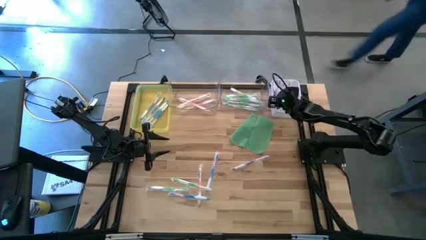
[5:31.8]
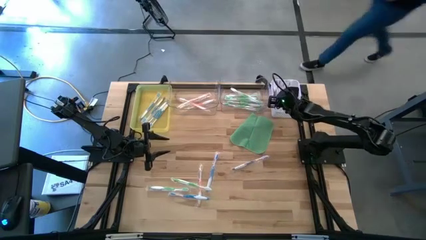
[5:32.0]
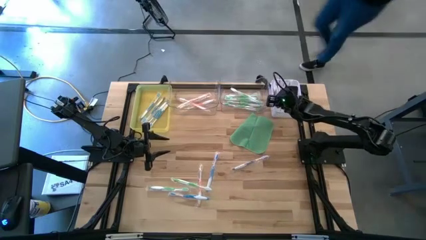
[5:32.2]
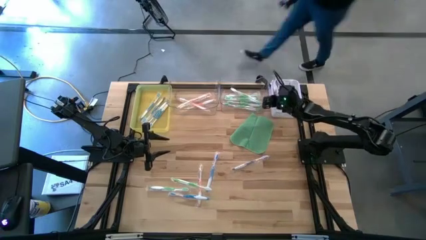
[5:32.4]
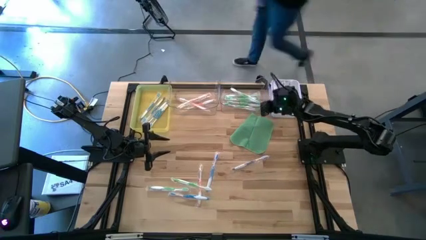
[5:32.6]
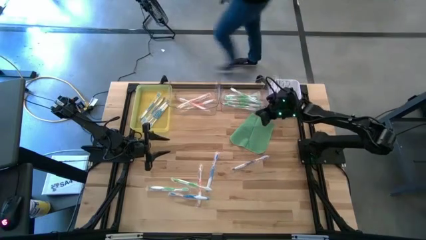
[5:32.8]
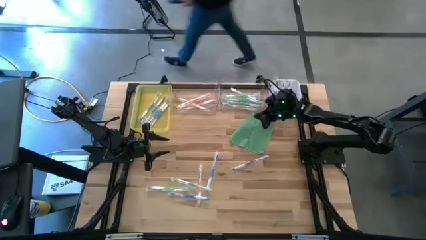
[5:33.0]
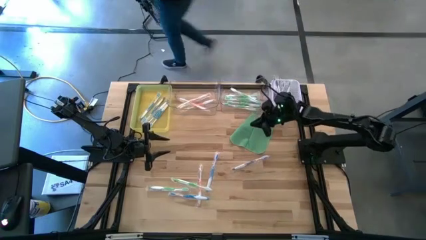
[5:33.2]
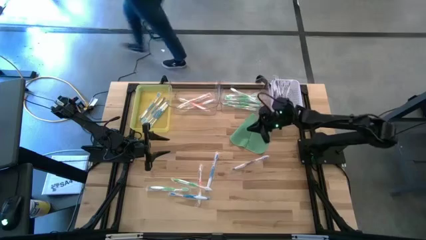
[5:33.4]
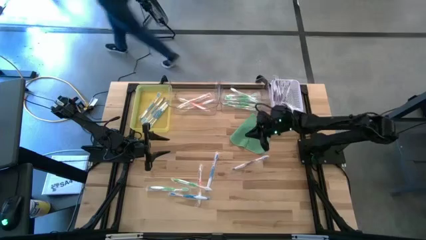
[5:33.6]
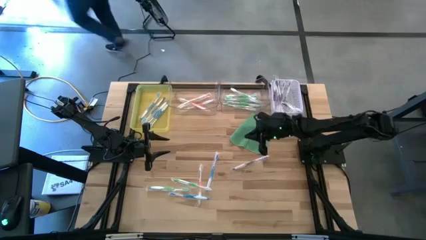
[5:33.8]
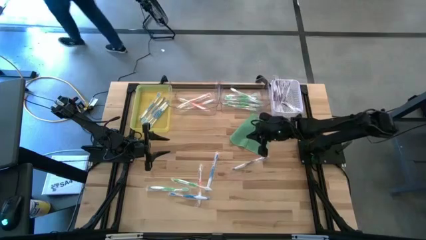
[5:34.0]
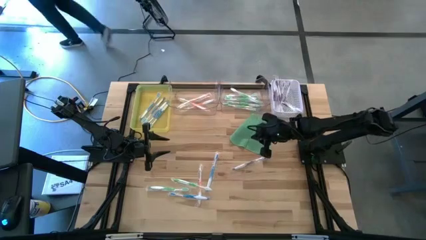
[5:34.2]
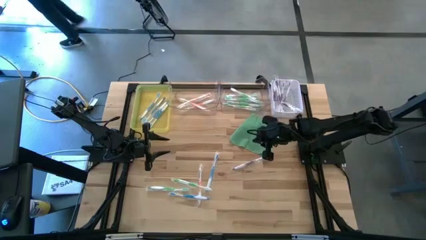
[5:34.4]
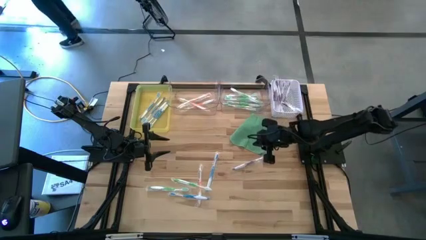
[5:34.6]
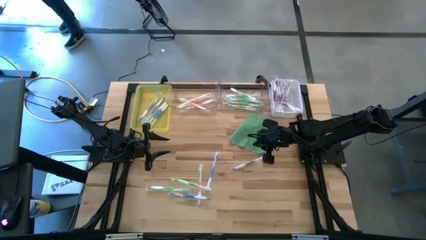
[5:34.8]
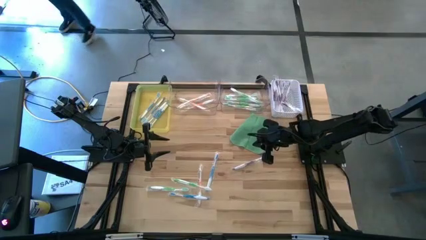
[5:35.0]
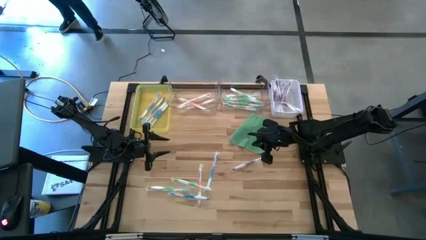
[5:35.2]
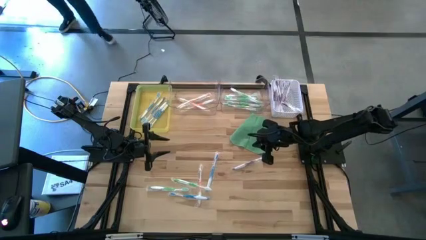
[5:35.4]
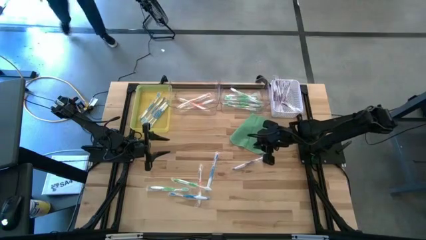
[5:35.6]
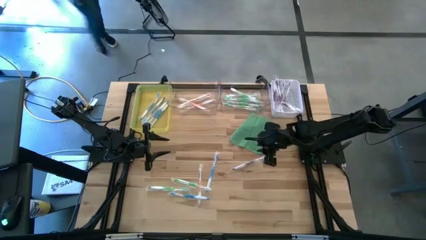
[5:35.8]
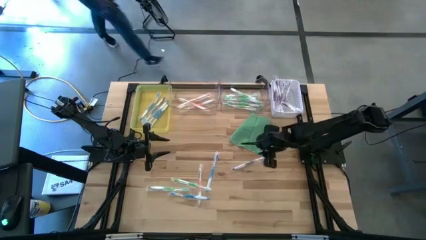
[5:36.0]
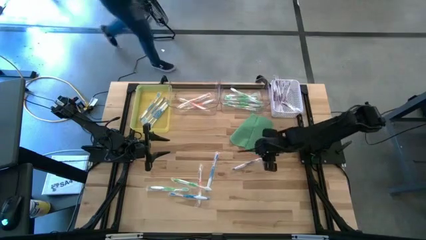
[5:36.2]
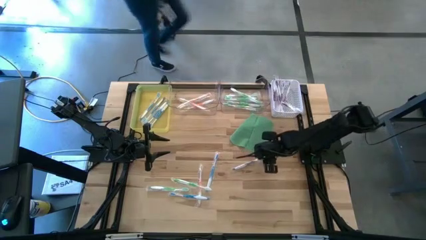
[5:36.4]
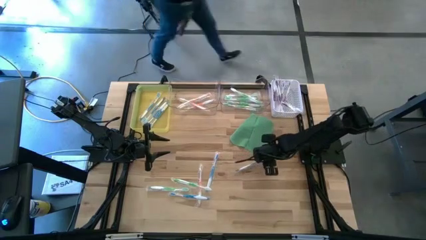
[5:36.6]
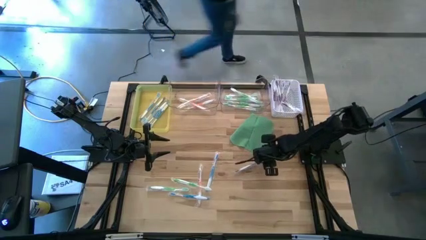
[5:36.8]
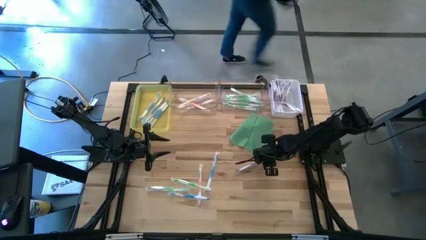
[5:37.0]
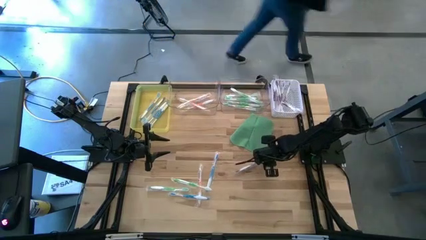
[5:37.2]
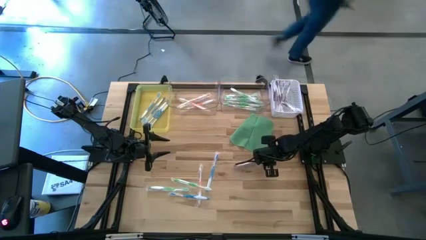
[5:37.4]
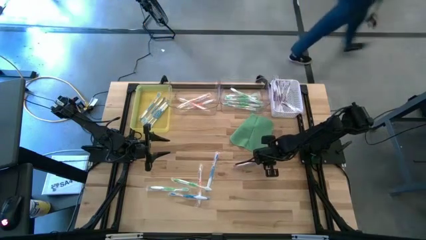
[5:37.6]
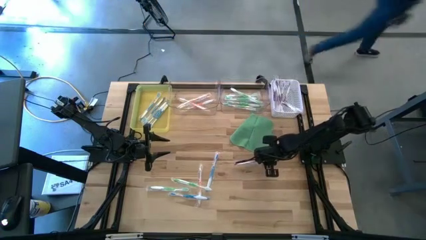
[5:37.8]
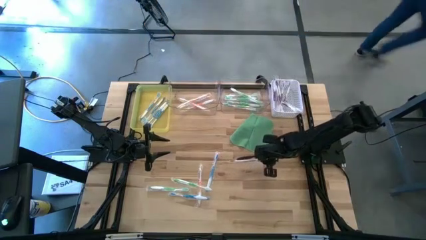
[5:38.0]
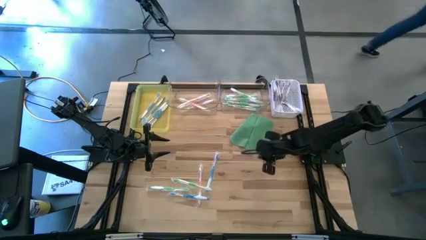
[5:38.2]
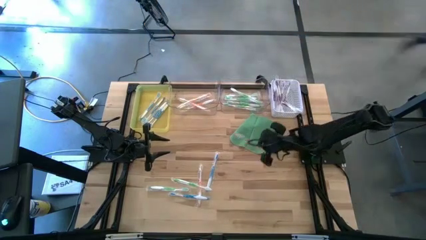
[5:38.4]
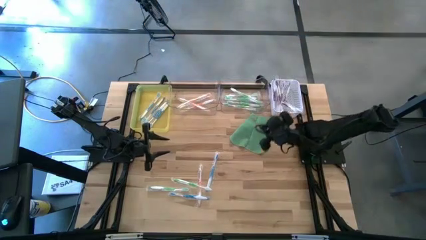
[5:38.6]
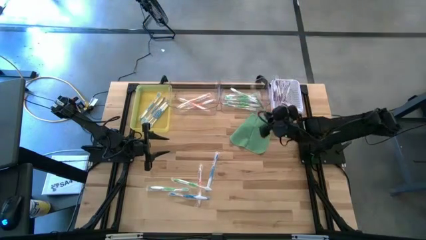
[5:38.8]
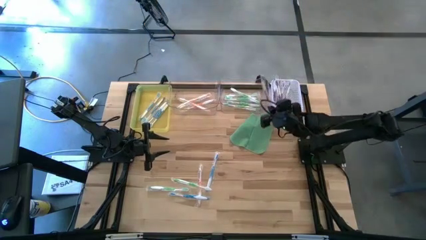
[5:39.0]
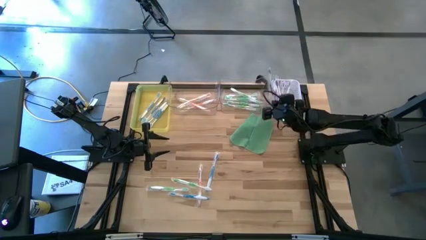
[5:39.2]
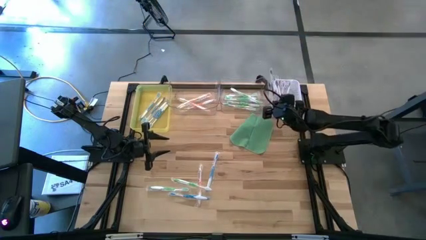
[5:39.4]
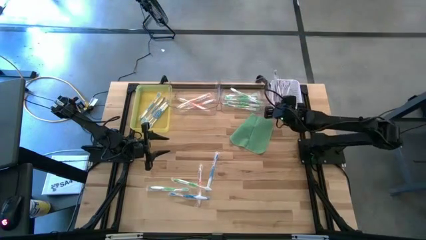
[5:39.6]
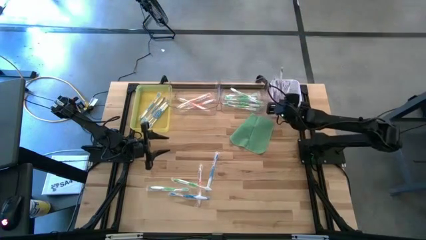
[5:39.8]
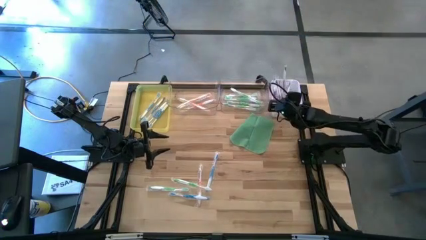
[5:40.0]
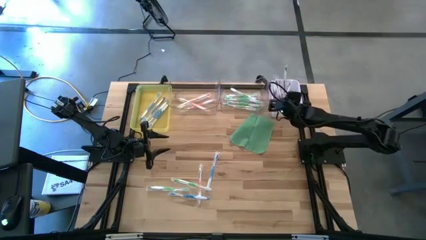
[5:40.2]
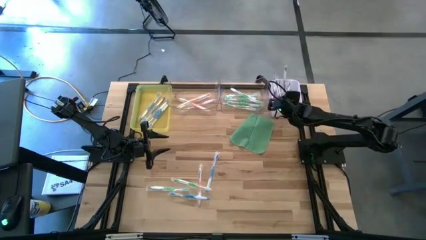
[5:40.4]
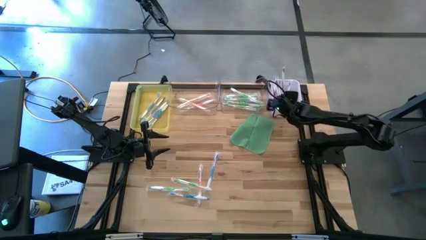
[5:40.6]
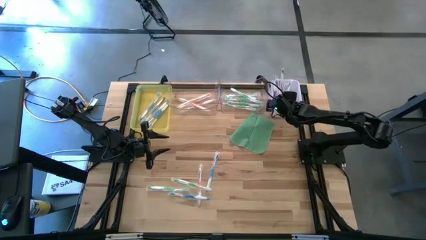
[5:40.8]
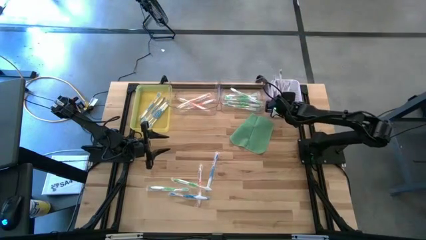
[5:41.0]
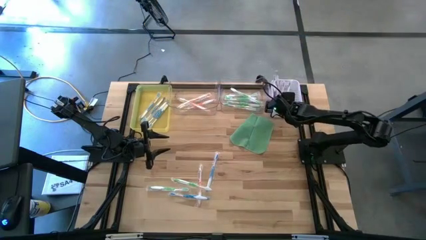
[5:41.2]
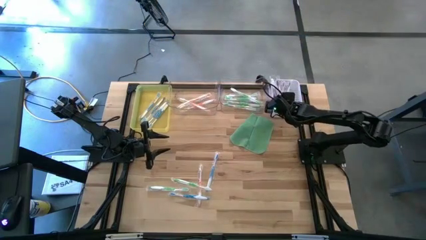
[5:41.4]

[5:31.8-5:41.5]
Task: Pick & Place Toothbrushes
Put the purple toothbrush into the white bin

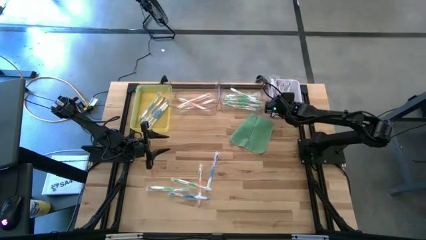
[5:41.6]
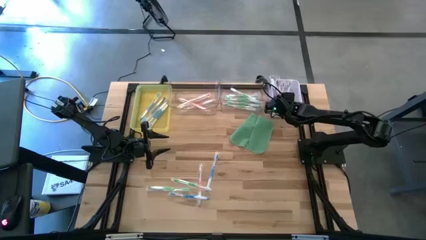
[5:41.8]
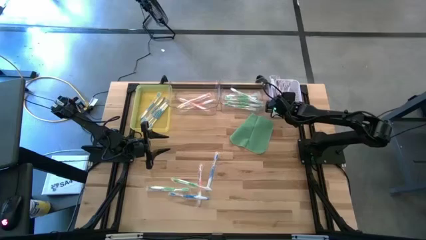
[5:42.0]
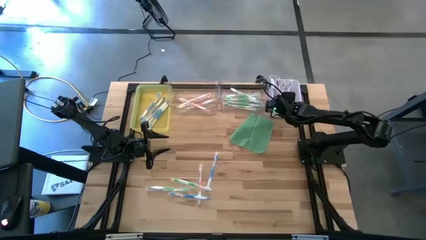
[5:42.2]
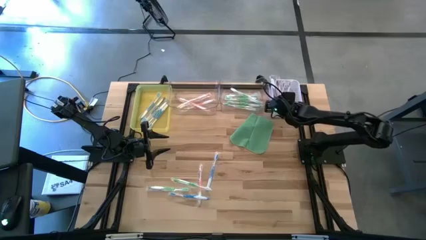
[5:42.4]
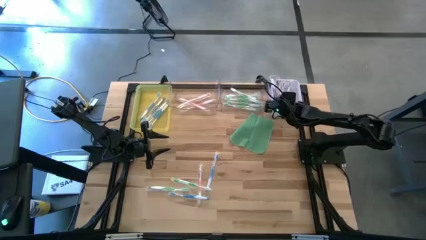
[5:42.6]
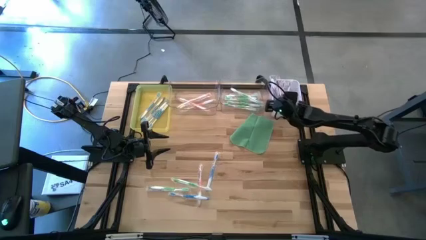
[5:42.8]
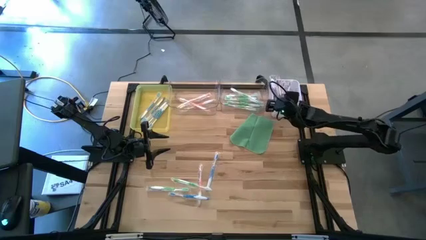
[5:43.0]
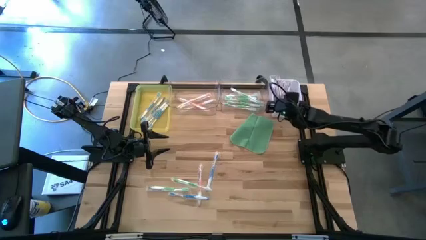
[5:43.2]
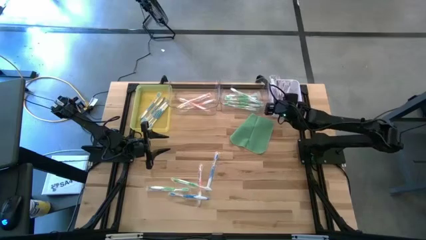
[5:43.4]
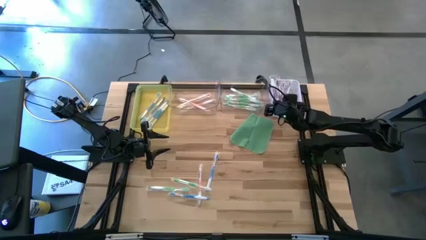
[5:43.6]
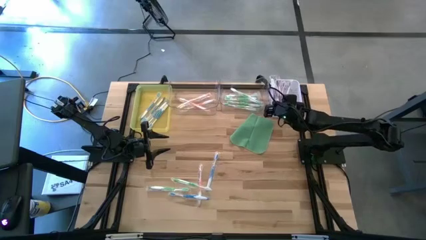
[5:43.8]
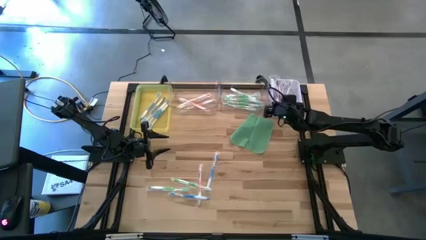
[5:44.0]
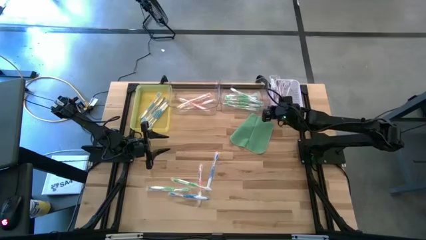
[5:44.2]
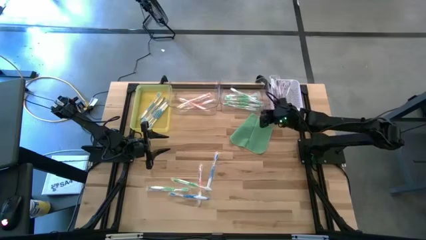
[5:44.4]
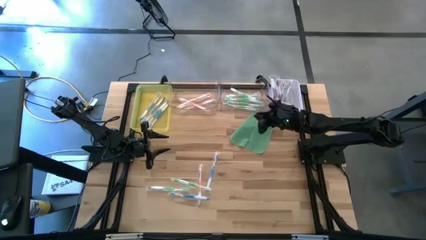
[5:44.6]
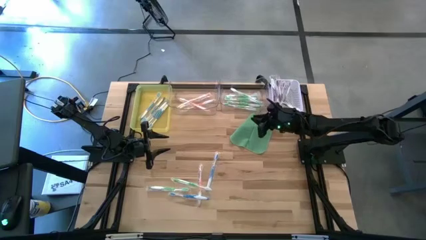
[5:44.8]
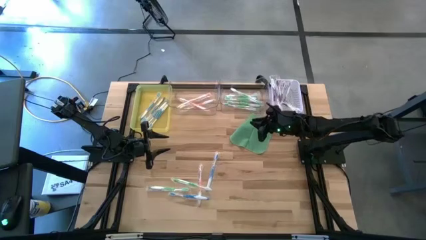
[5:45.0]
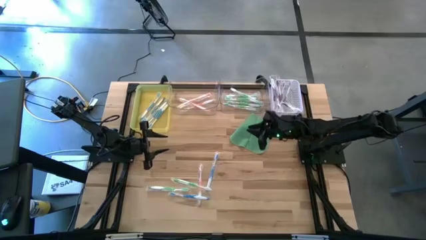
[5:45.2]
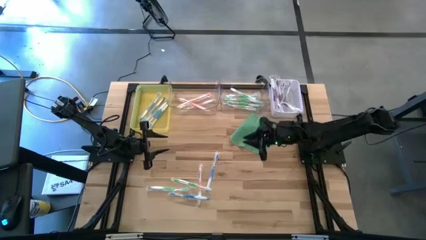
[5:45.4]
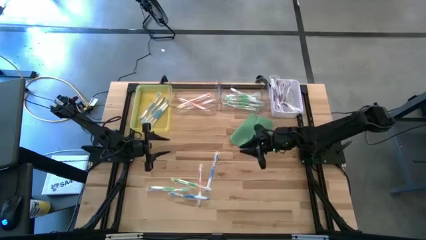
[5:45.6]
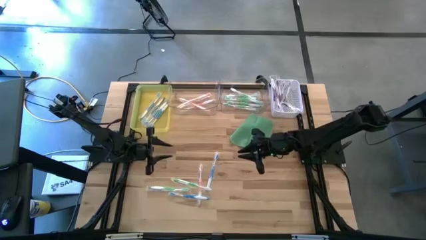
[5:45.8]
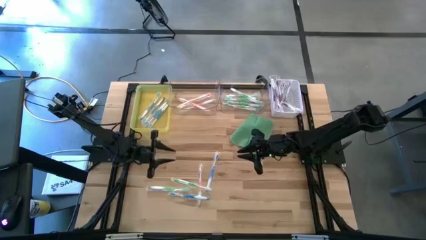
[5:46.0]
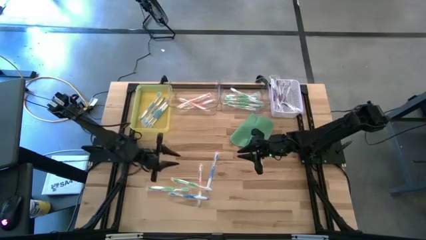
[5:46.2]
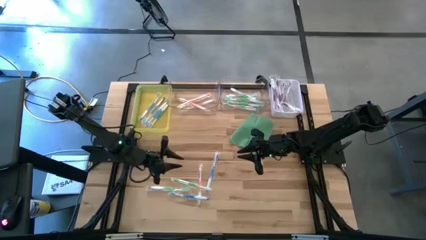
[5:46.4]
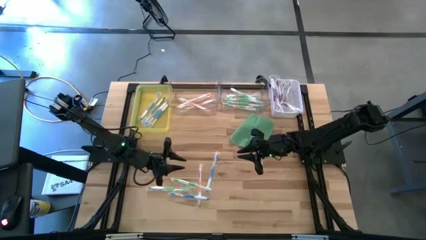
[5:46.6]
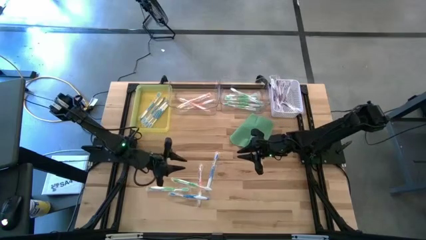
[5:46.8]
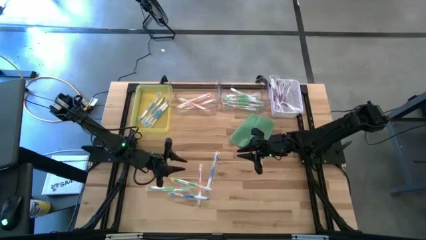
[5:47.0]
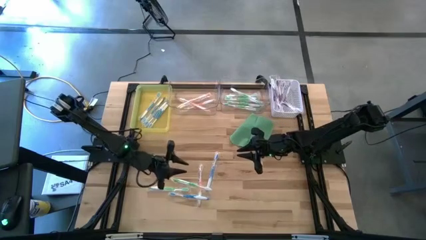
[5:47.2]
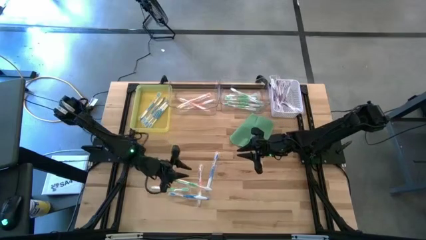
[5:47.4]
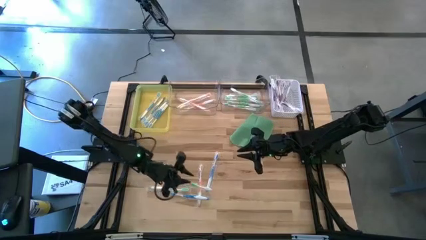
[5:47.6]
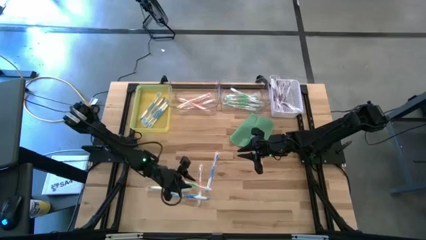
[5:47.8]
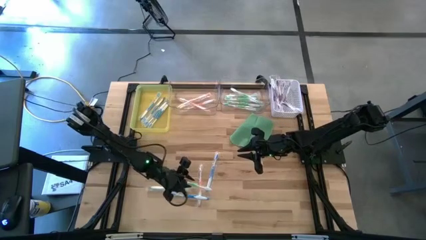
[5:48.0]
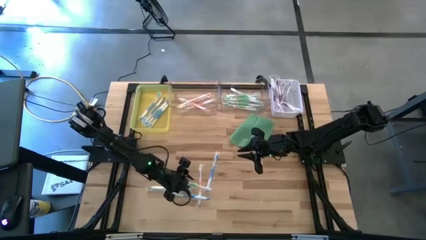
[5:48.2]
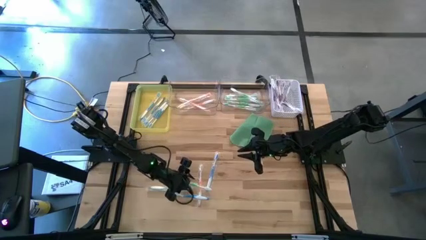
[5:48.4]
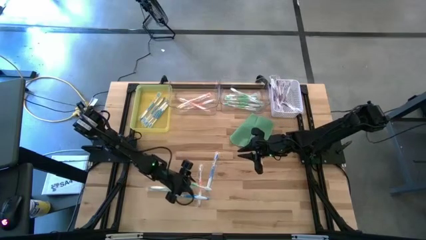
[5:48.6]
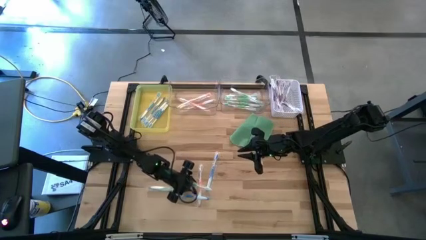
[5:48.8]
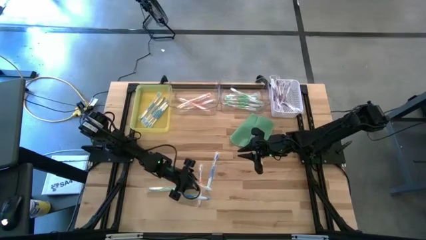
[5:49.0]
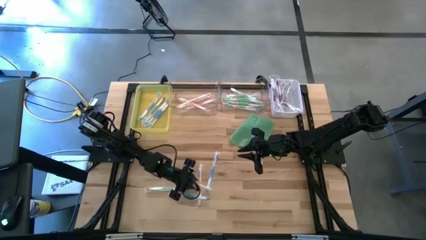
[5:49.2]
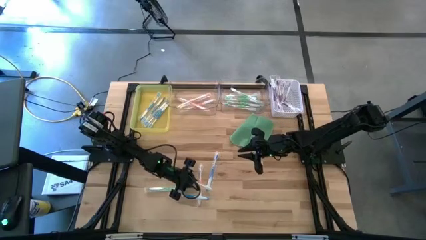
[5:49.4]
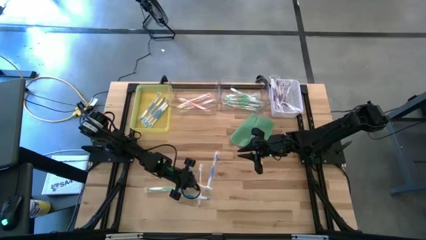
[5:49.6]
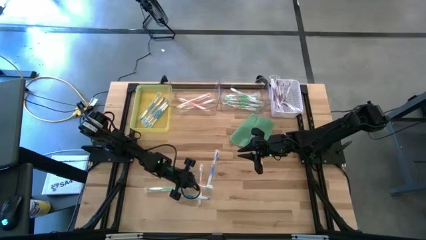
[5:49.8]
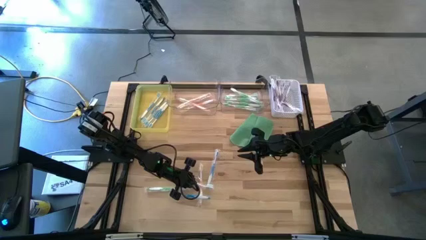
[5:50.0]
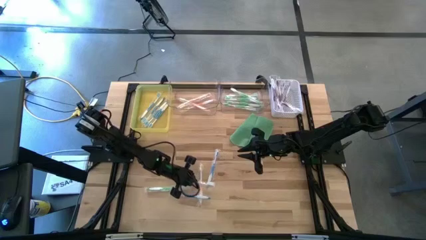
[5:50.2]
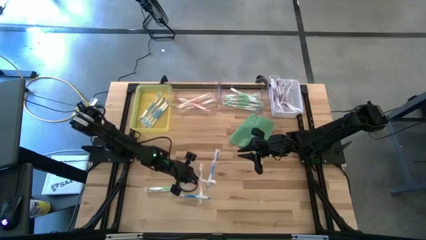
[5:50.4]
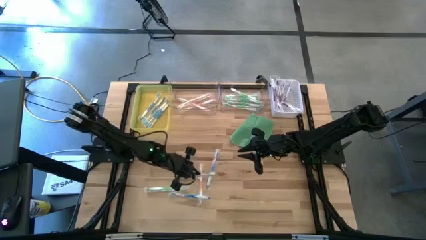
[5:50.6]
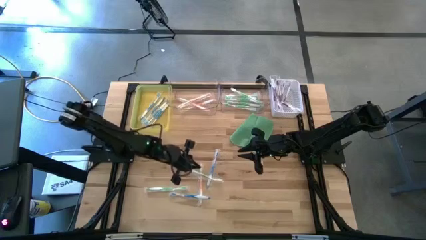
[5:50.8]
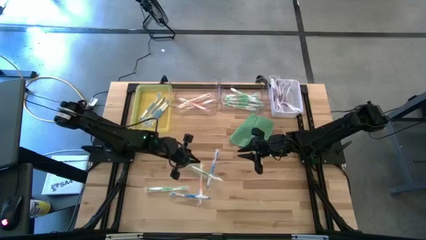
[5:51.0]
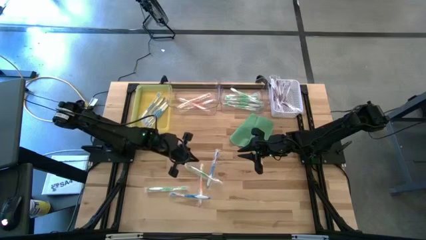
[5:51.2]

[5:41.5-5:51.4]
Put the green toothbrush into the right transparent bin
